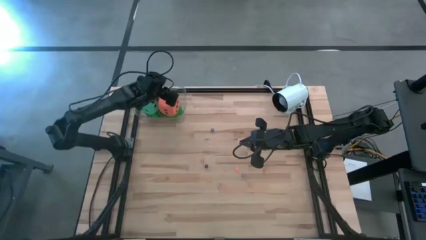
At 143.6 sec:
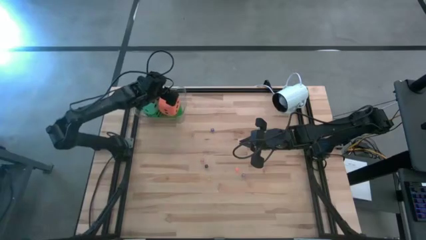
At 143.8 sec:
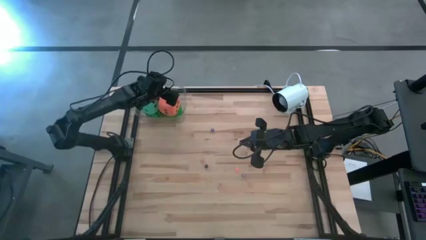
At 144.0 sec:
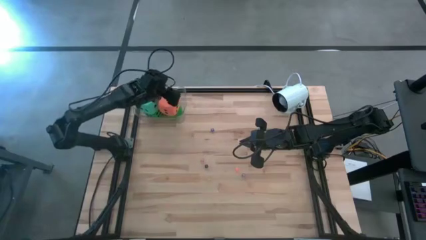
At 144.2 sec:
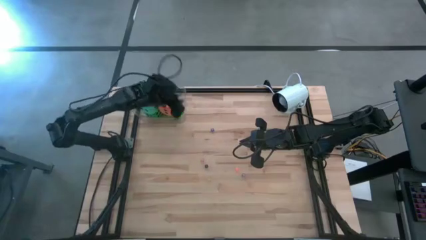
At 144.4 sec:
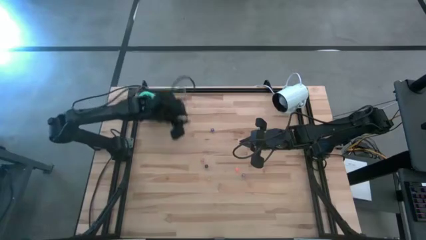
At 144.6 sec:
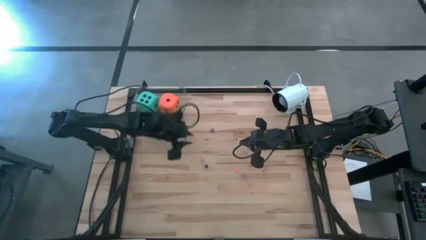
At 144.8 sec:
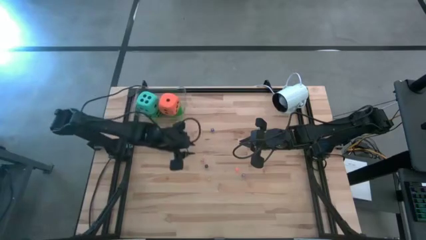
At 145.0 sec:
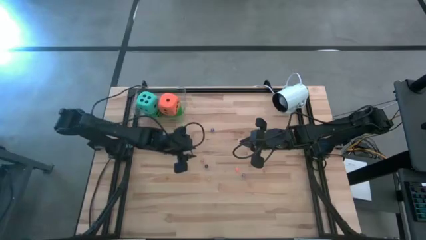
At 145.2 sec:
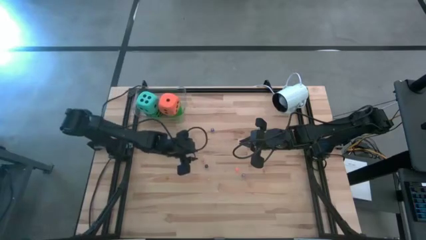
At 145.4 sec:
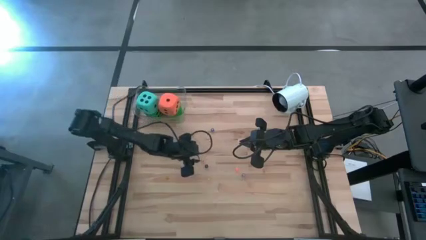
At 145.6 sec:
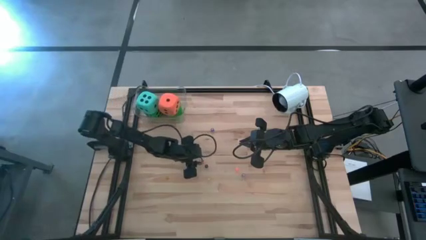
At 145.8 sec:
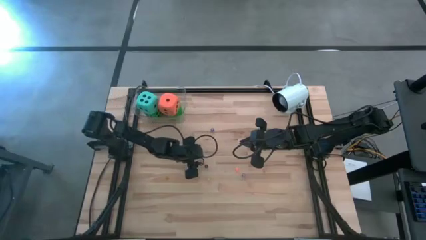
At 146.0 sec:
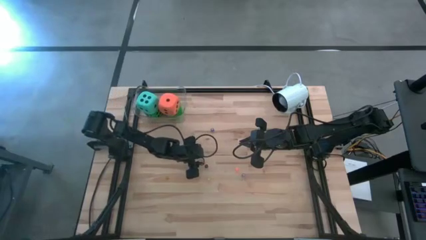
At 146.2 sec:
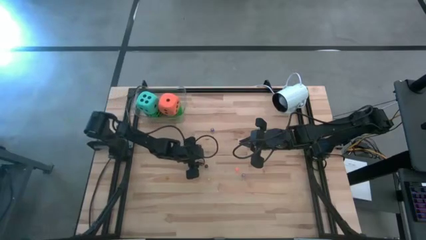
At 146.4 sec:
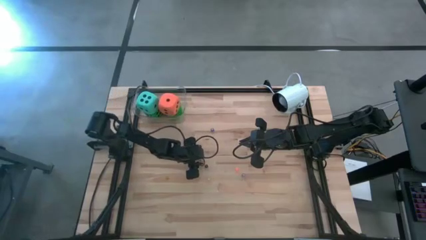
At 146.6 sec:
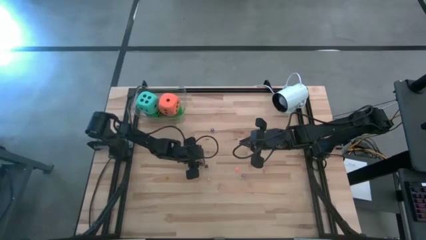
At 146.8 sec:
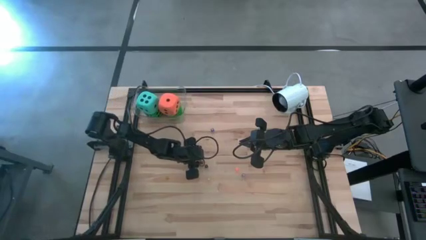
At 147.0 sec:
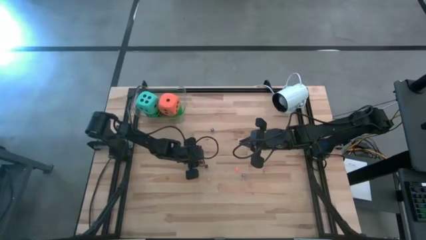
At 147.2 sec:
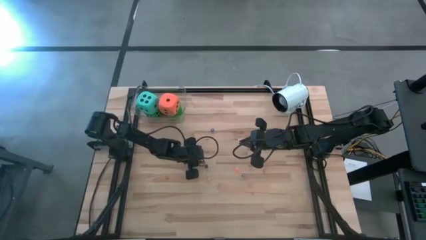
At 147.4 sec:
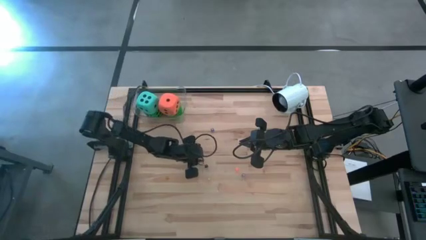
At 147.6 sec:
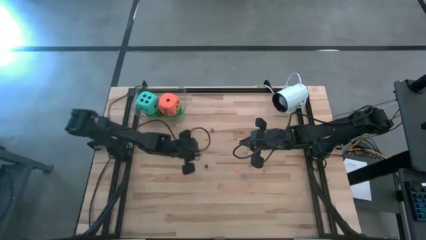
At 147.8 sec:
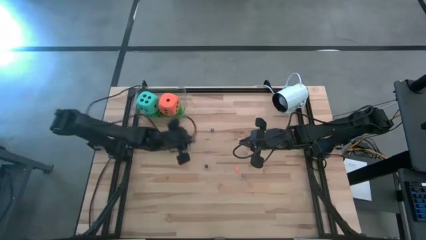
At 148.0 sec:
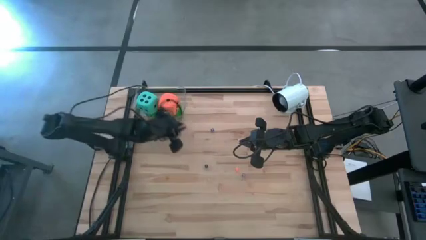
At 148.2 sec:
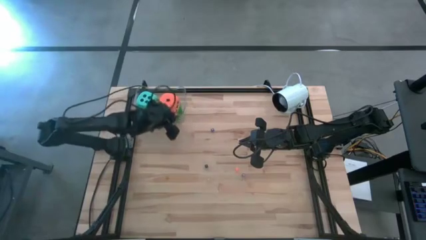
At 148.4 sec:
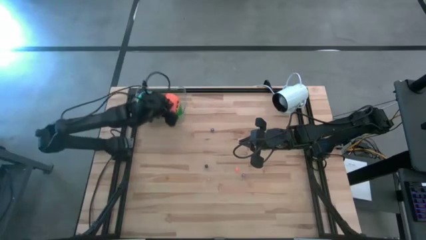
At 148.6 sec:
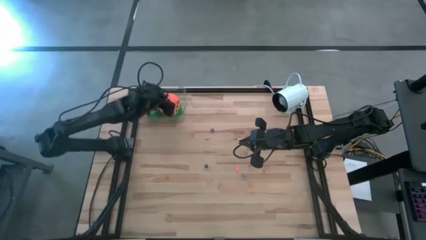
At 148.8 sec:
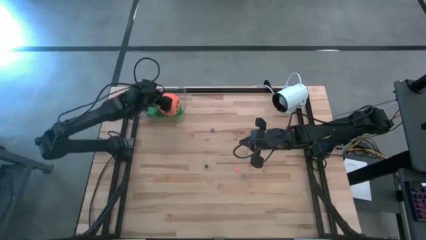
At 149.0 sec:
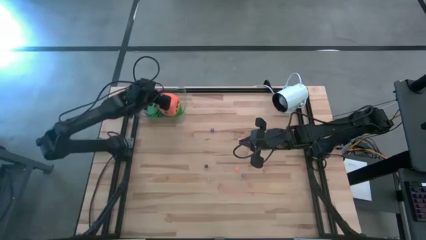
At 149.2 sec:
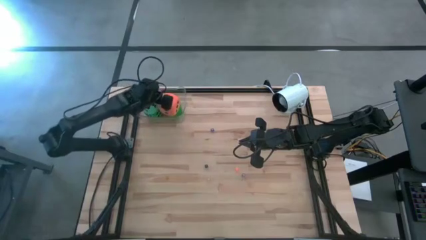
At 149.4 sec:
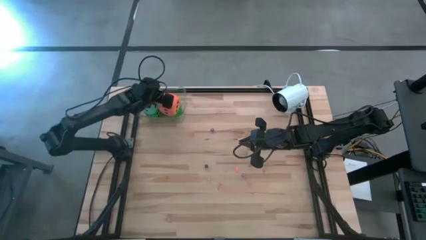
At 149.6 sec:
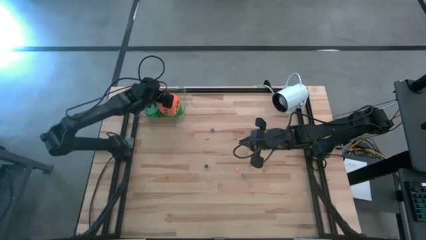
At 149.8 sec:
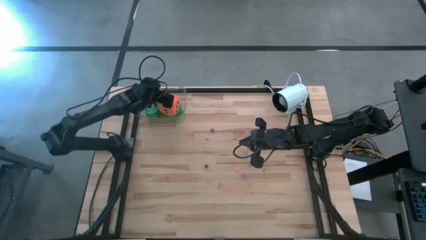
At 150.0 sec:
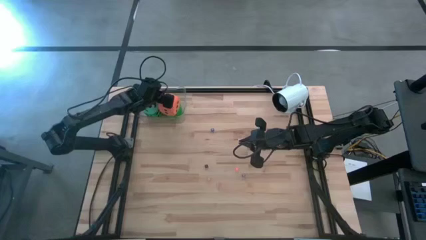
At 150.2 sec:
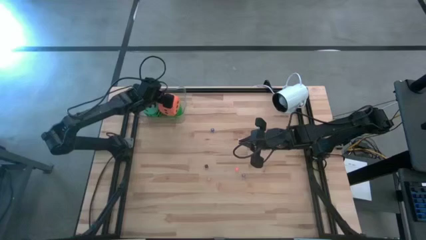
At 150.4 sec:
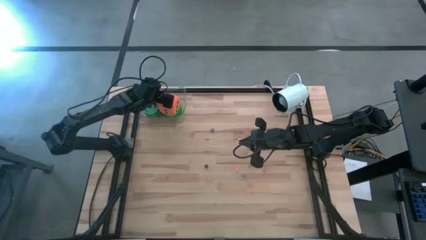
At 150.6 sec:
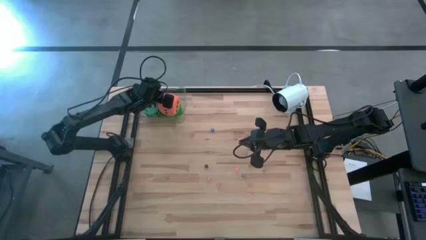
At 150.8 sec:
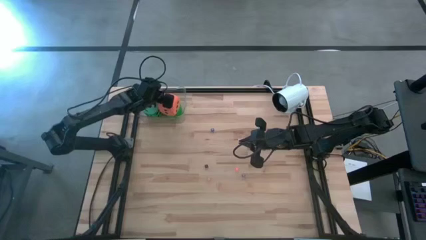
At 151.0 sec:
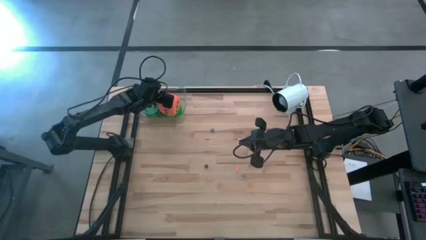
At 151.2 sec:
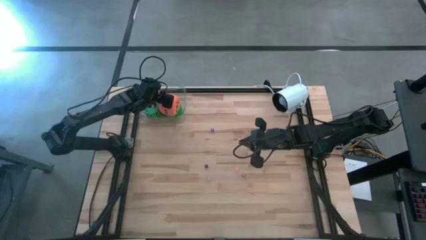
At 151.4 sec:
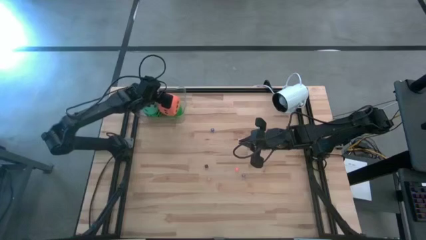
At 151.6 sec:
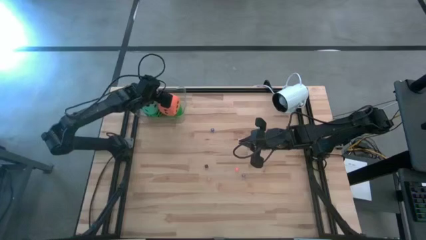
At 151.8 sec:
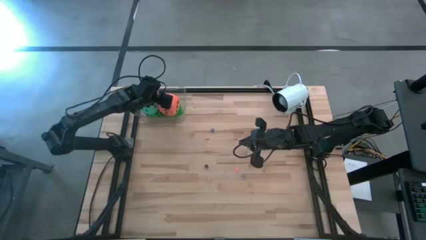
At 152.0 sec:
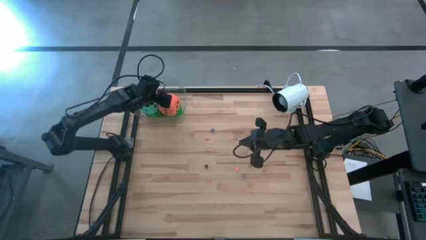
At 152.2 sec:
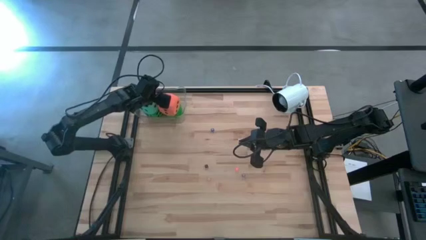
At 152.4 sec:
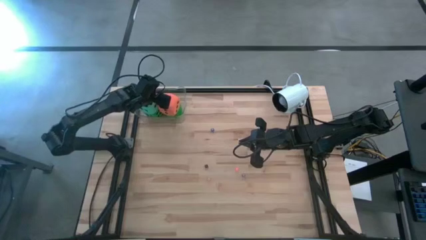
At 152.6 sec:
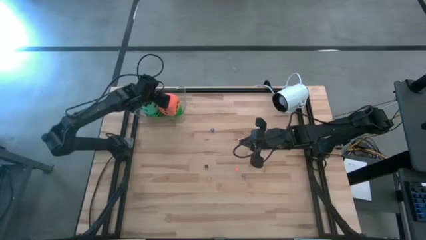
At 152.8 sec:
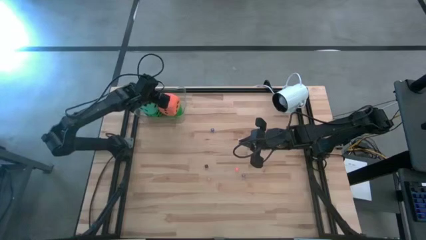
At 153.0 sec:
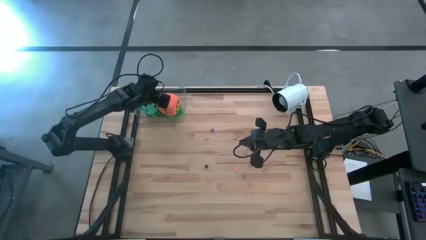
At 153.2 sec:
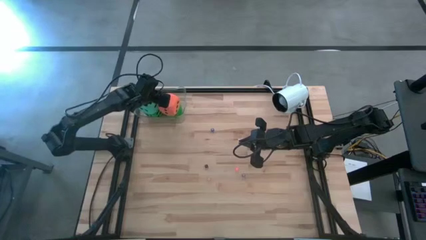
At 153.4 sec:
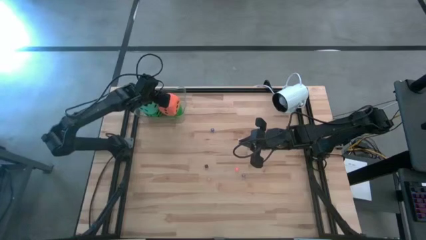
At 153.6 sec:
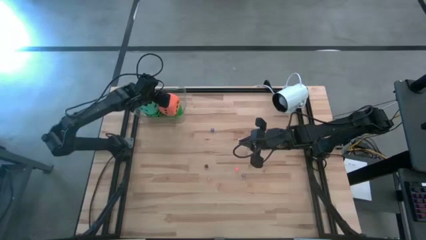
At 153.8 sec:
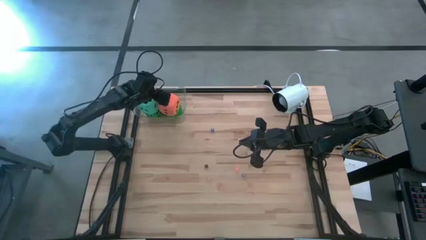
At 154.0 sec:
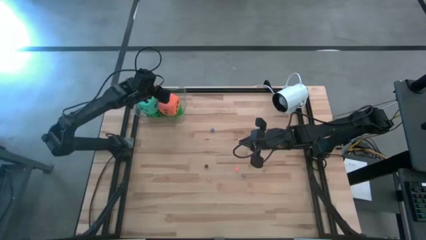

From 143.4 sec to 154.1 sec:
Task: Pick & Place Dice
Put the small red die into the transparent bin

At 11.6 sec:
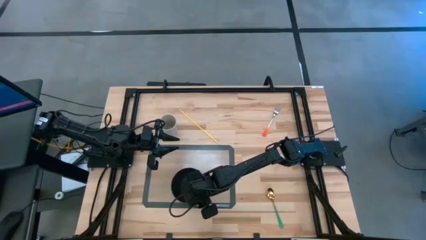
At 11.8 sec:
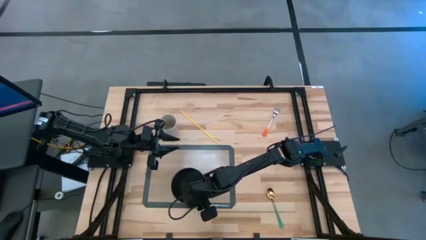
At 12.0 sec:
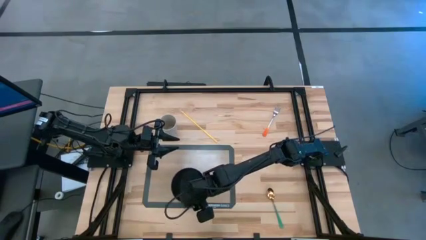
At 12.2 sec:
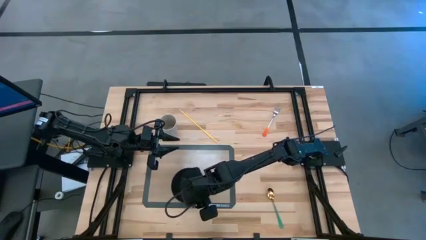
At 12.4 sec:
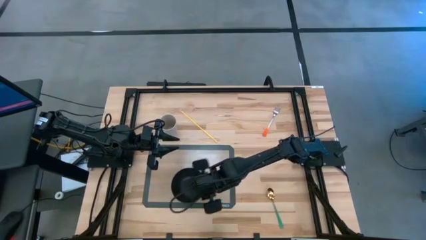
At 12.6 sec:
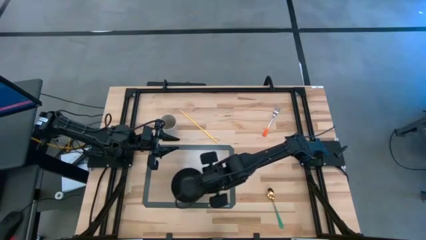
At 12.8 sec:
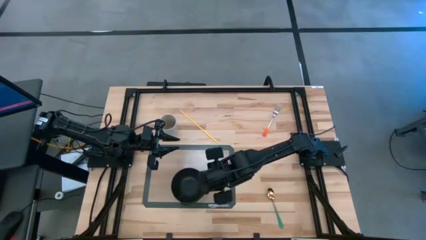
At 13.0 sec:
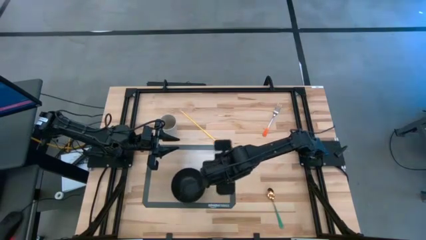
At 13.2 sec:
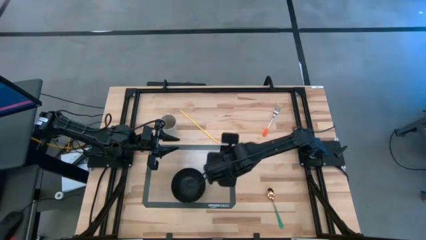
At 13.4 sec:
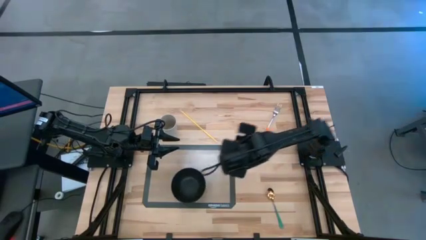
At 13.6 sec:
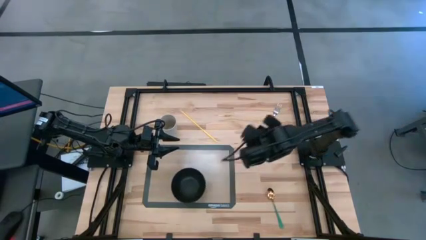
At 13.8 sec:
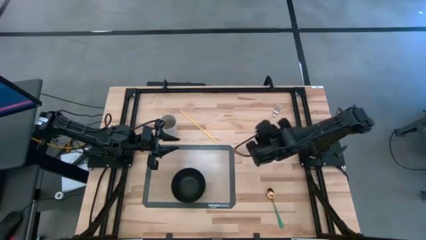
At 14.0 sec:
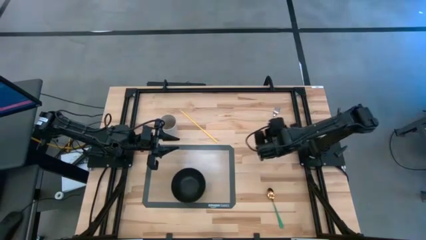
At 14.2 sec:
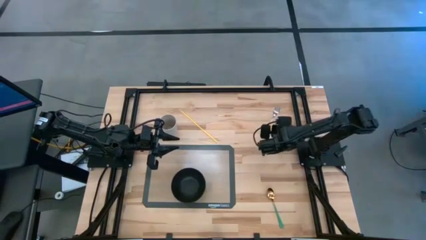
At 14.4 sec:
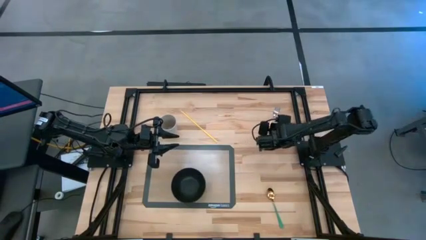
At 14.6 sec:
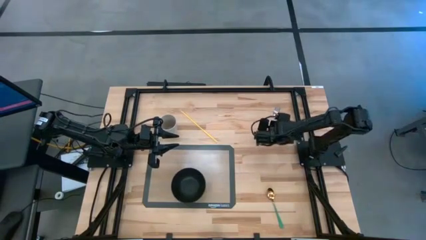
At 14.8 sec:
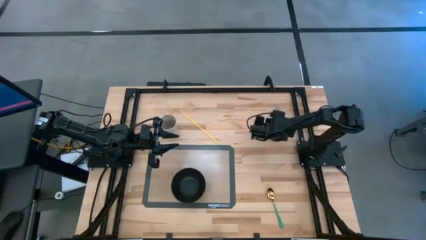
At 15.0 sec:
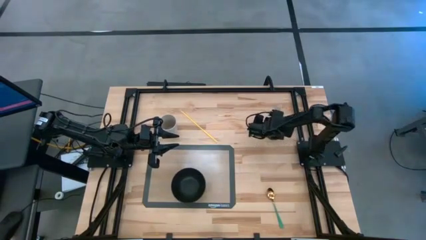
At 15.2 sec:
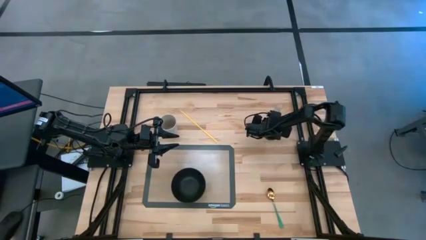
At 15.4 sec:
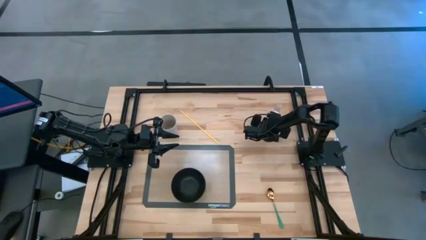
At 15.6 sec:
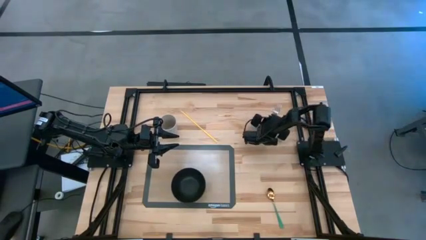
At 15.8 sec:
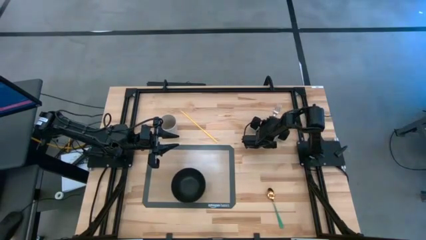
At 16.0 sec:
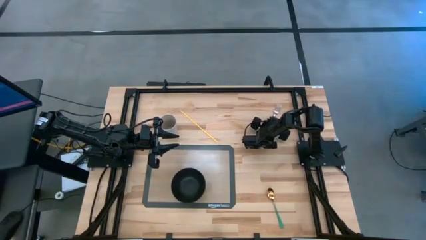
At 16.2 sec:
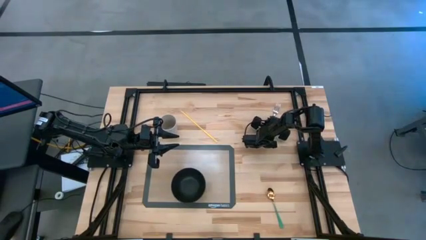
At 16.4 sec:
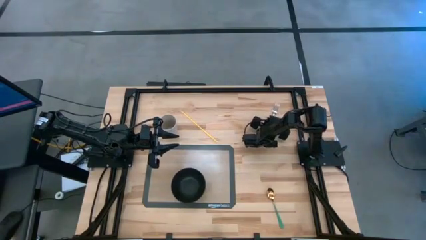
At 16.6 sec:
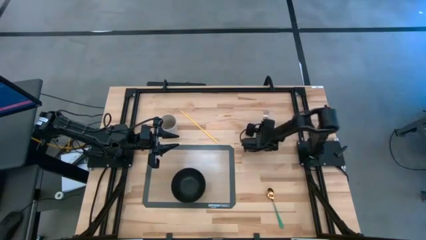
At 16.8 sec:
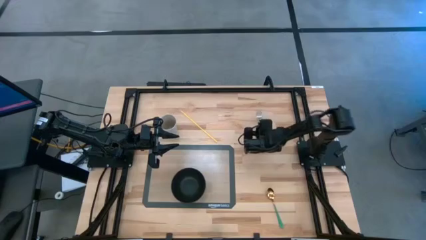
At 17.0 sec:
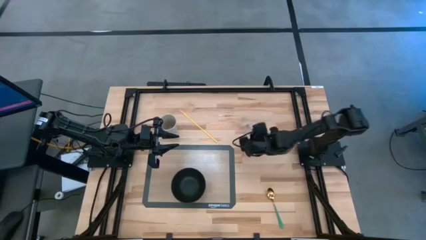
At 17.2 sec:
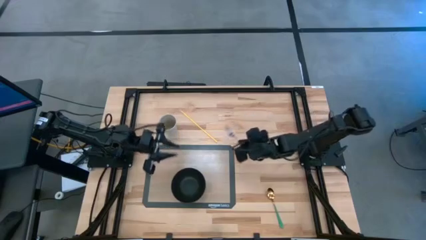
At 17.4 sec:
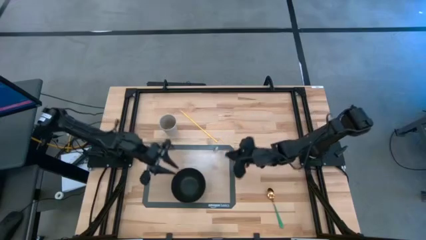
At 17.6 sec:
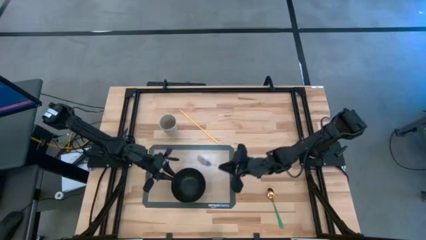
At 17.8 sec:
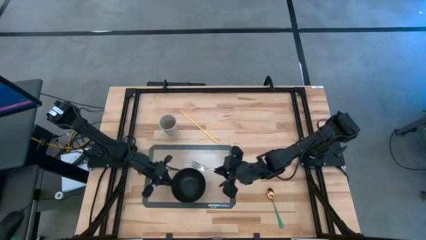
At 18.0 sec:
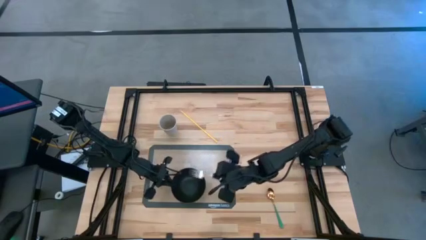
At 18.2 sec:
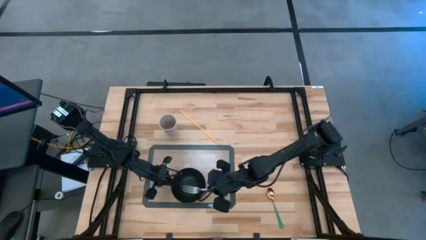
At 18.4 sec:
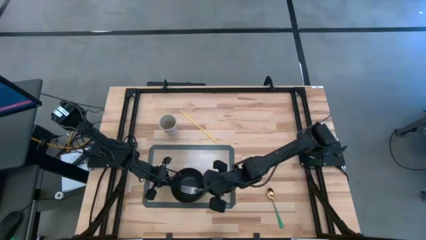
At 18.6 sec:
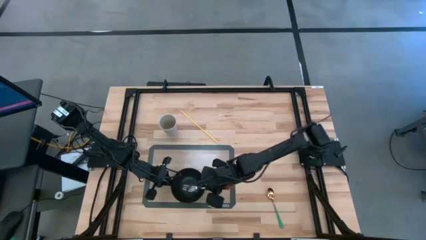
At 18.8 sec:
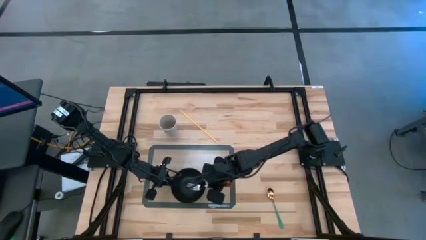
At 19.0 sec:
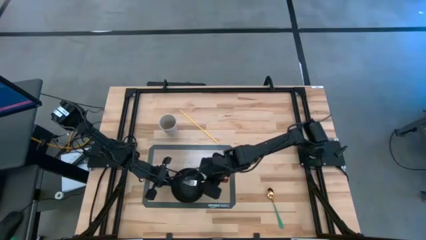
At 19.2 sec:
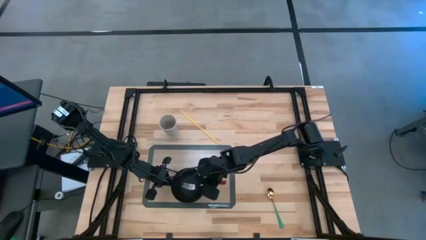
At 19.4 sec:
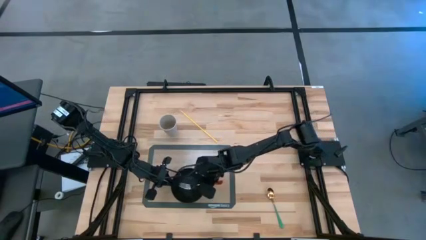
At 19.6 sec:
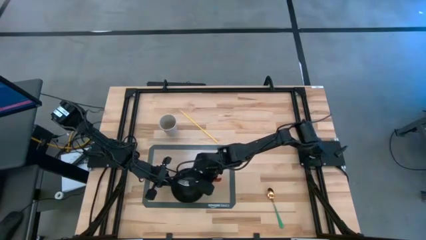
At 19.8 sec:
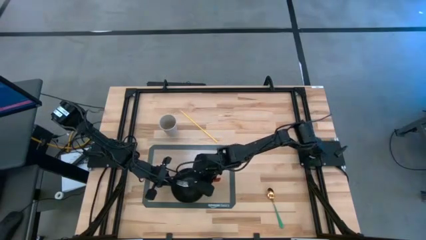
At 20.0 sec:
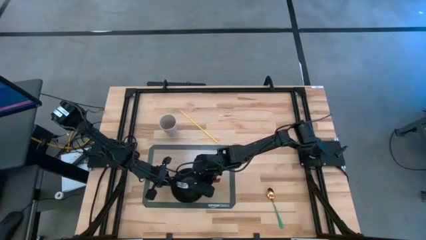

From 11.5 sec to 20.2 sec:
Task: Pick & Place Utensil
Put the orange fork into the black bowl on the mat
